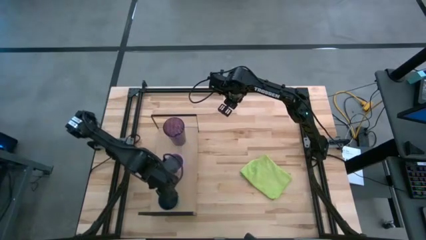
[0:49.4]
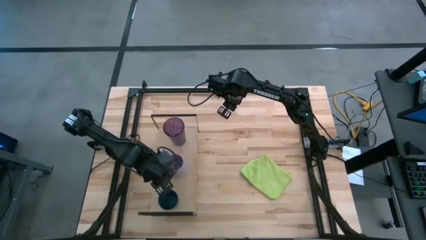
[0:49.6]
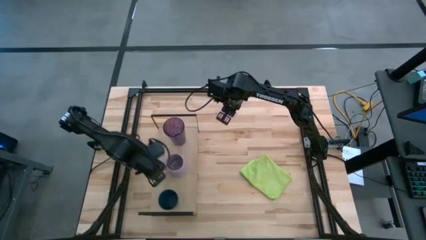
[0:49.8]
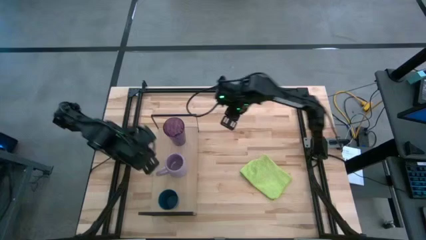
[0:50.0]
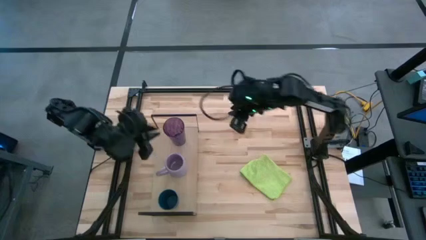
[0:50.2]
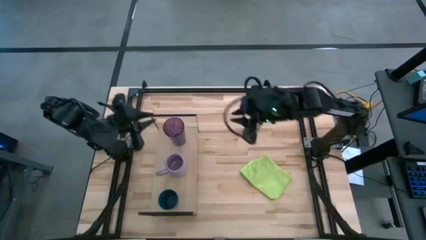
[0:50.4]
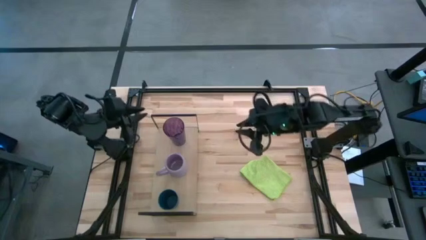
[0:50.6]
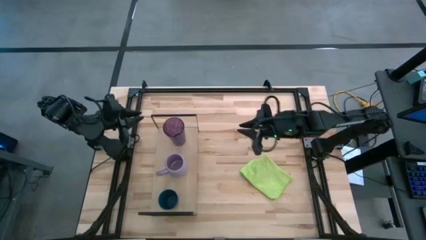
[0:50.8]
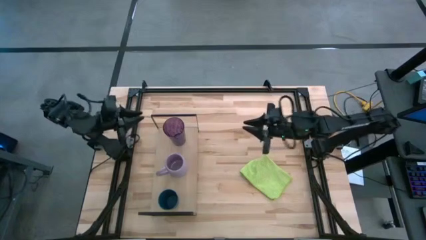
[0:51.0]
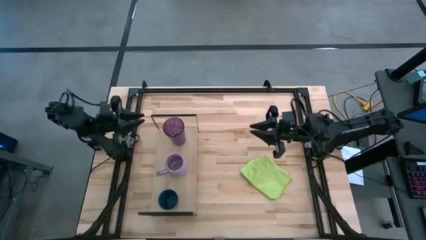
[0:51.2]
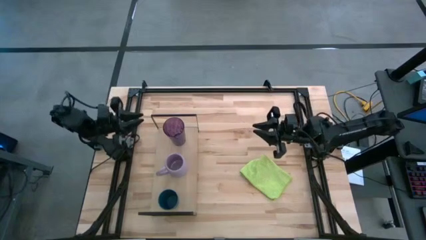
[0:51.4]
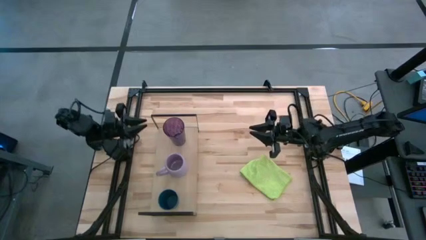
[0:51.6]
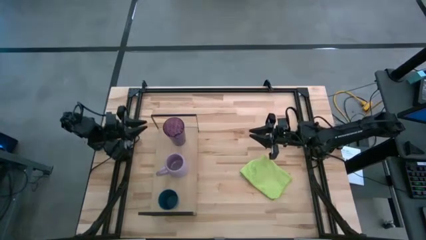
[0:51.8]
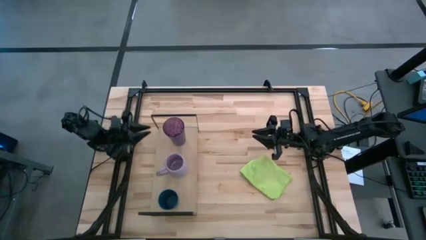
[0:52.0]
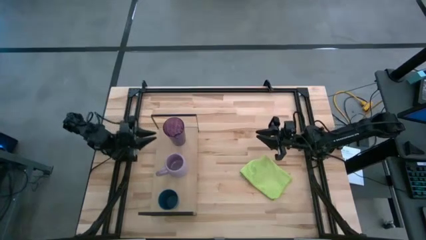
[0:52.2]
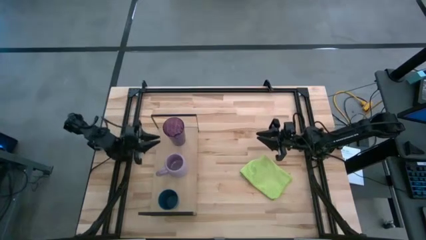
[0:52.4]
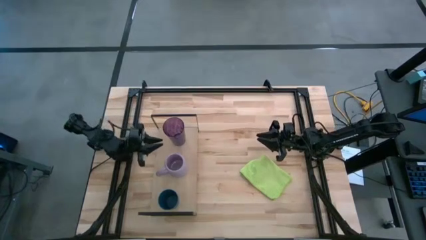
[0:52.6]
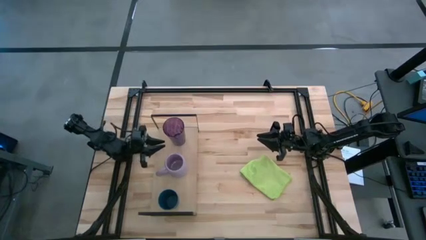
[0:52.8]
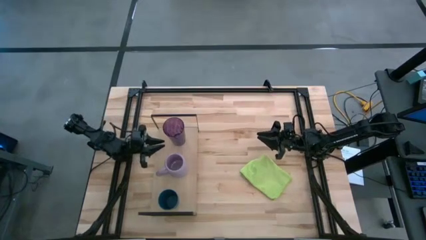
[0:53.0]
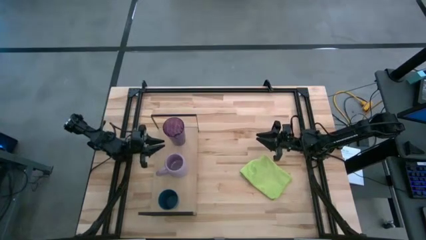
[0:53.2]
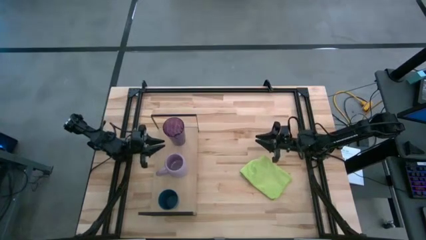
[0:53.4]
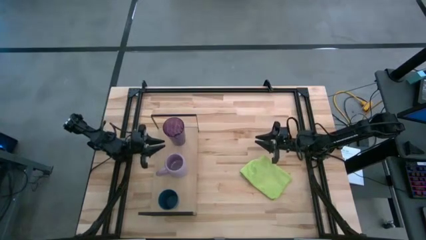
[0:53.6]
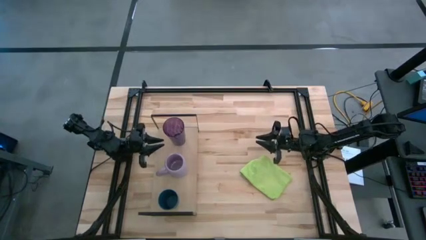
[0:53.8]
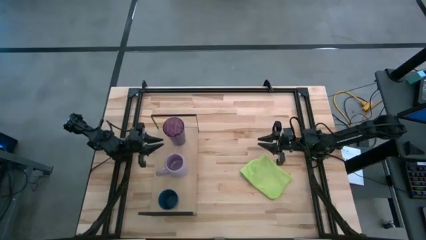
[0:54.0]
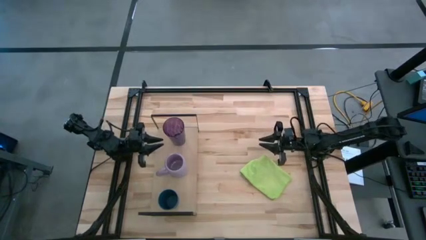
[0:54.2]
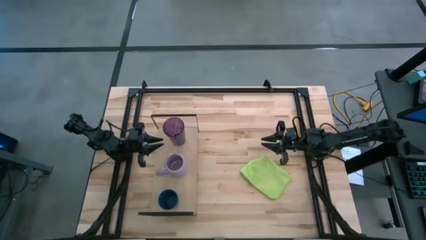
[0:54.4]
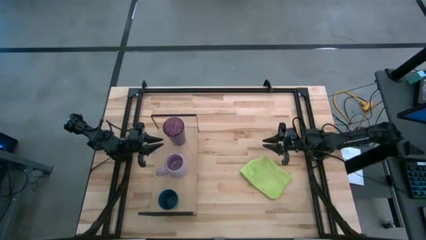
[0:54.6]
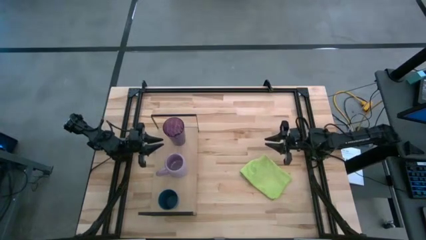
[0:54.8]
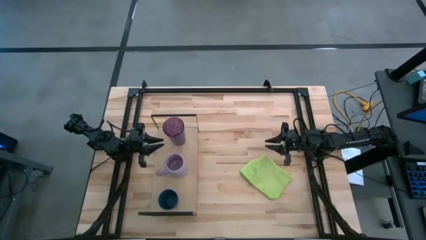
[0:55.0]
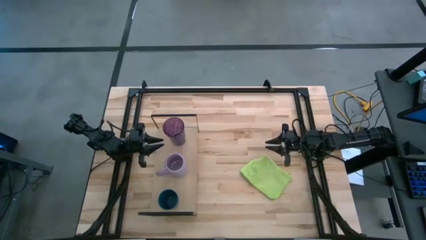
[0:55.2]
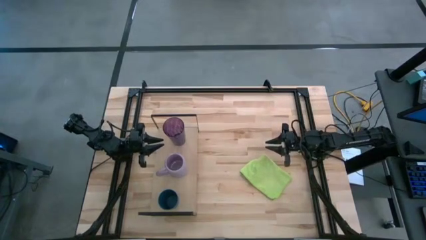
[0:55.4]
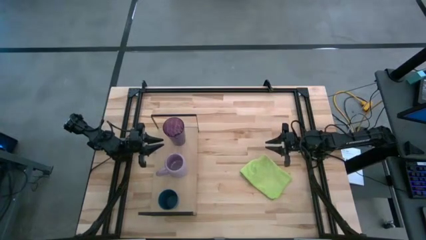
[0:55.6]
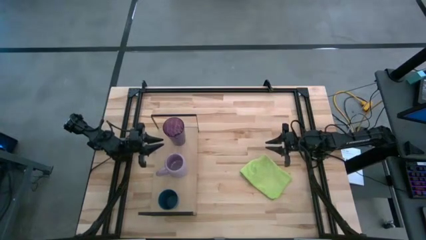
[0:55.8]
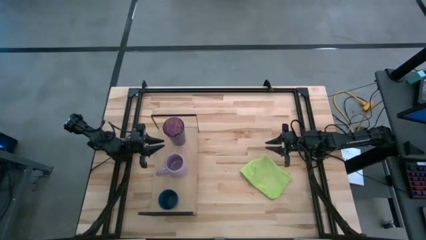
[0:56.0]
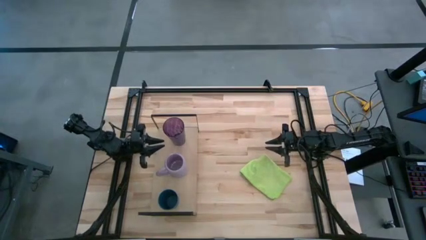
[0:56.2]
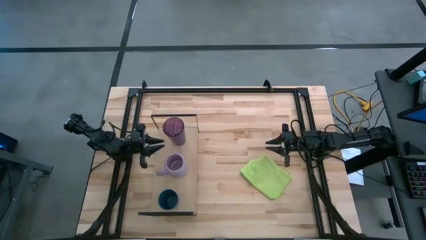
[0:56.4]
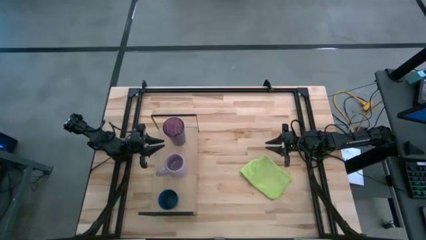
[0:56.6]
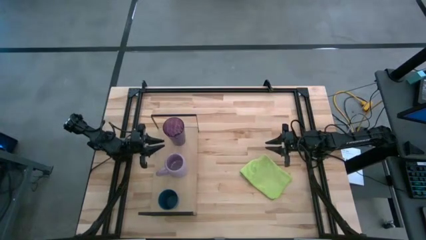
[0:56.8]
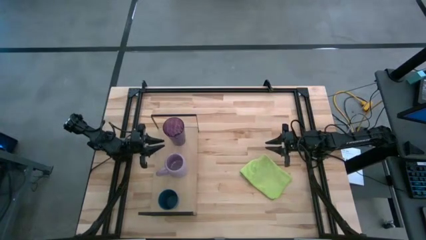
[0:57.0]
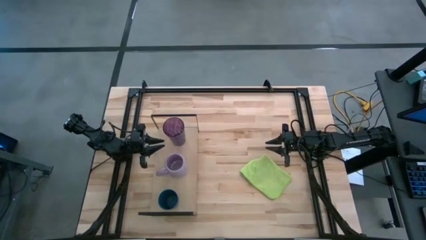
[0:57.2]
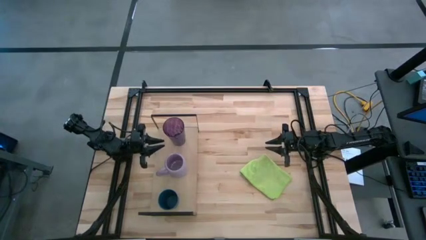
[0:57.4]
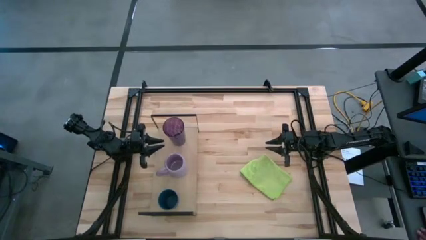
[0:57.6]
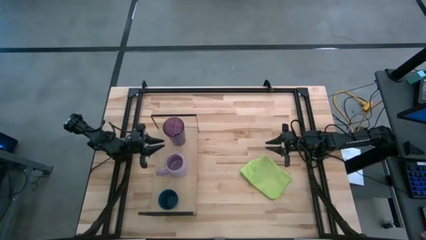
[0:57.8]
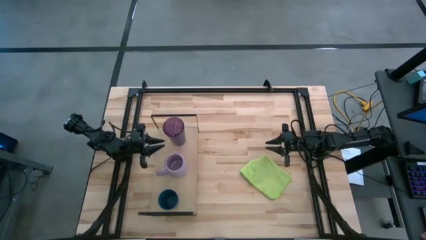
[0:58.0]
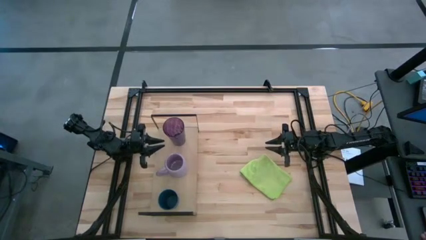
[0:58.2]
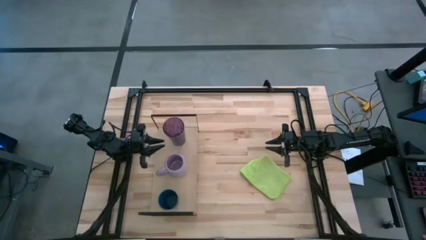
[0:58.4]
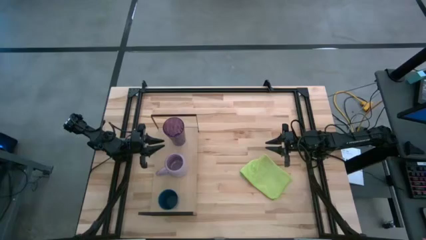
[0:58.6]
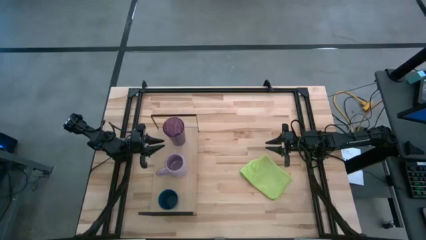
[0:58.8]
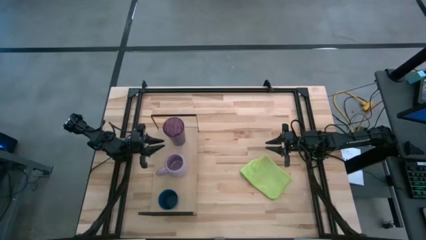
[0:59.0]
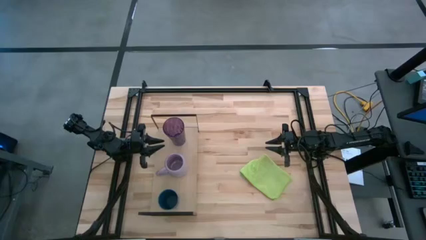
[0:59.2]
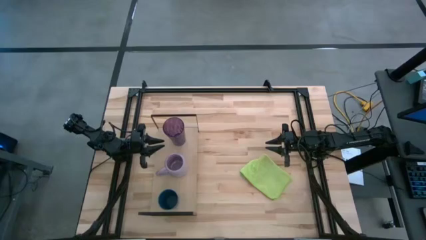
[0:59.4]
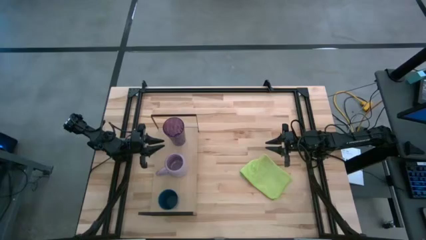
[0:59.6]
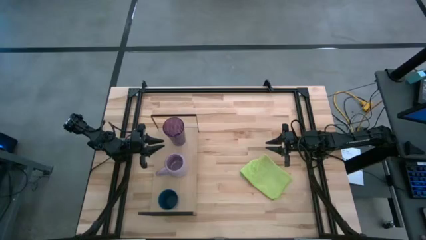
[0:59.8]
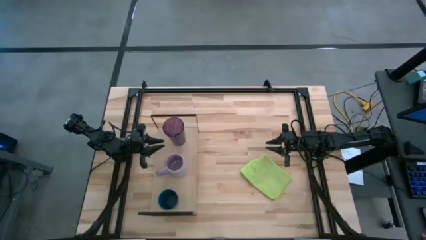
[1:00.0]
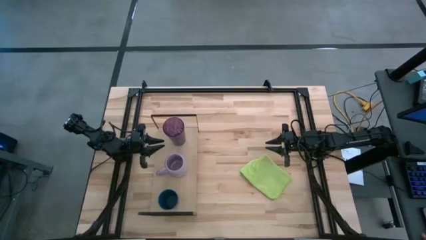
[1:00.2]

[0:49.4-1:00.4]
Task: Stack small to large cups/mugs on shelf
Return to Home Position
